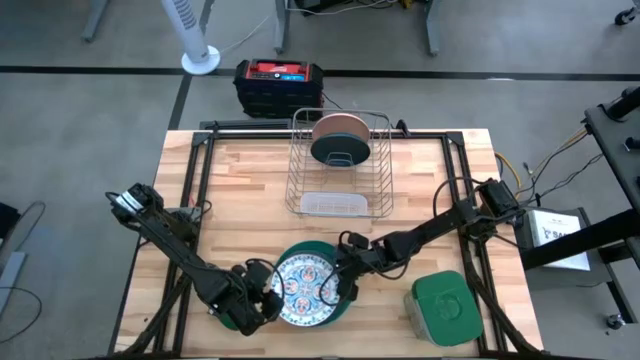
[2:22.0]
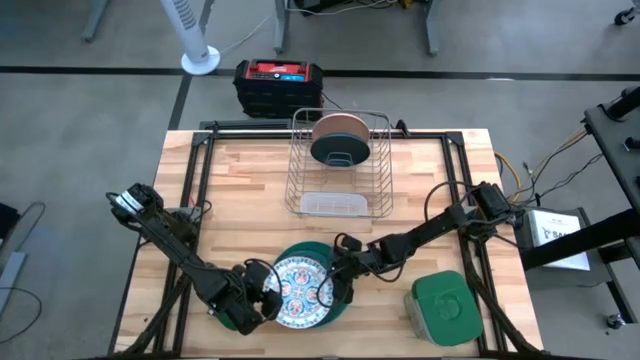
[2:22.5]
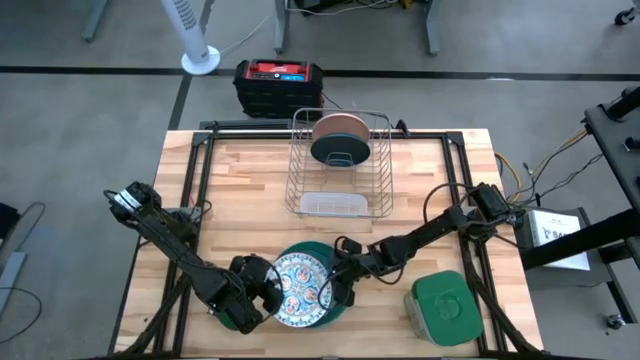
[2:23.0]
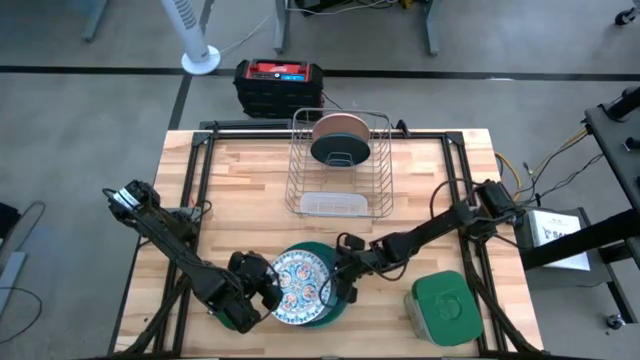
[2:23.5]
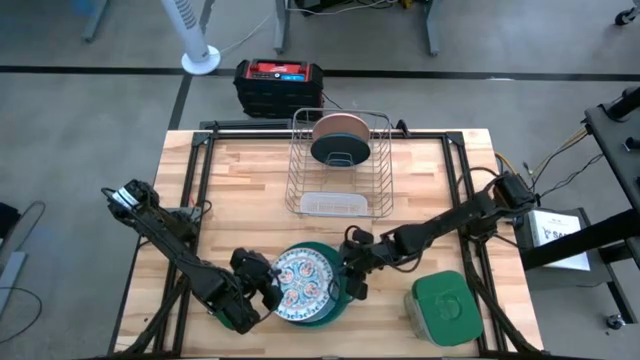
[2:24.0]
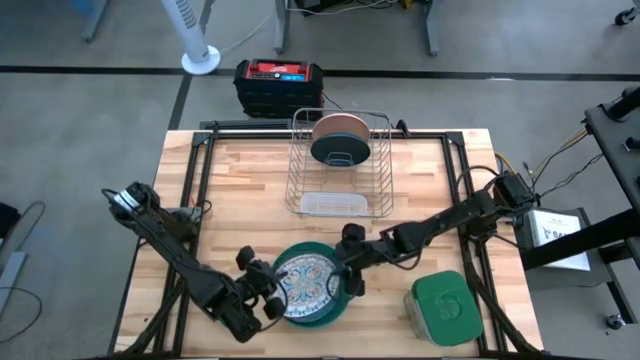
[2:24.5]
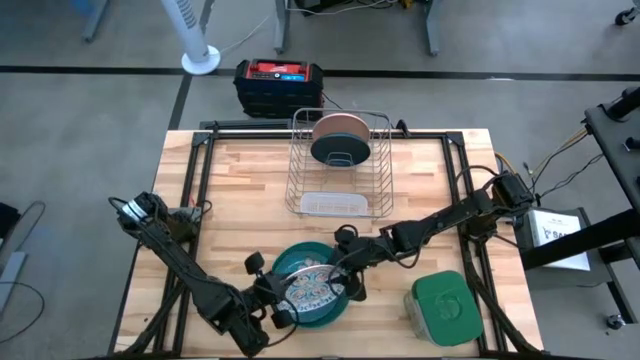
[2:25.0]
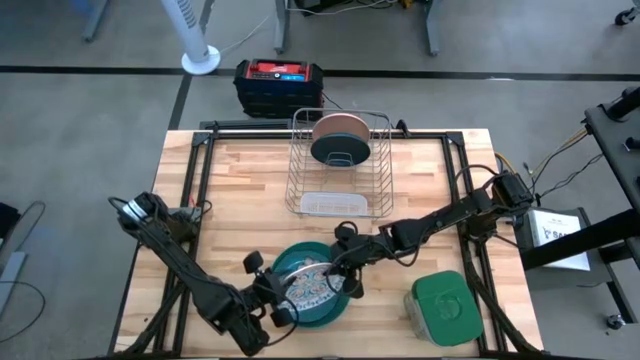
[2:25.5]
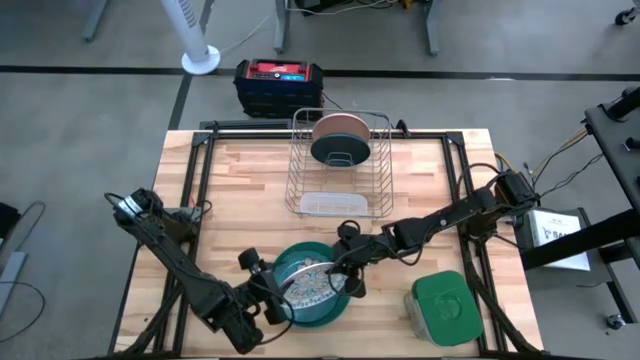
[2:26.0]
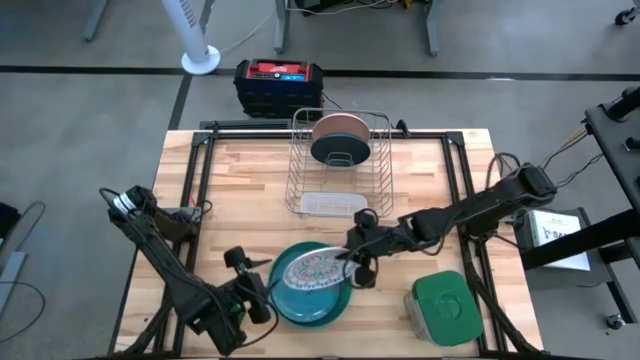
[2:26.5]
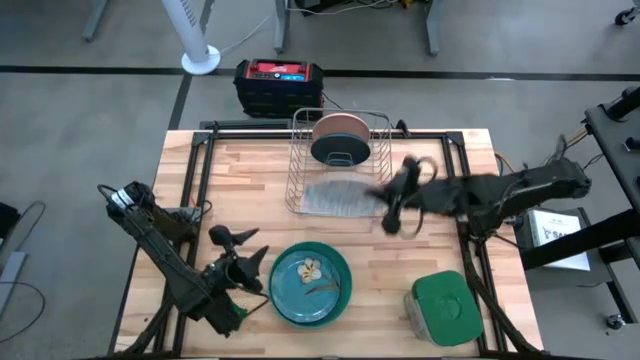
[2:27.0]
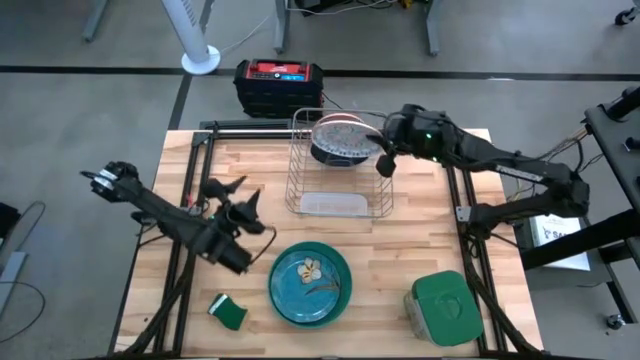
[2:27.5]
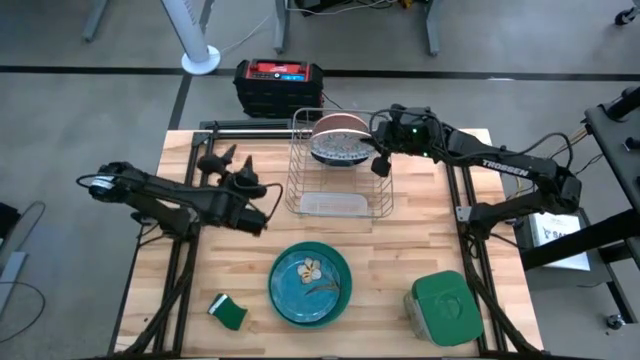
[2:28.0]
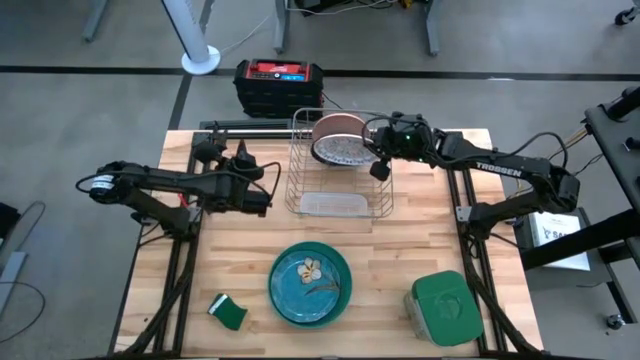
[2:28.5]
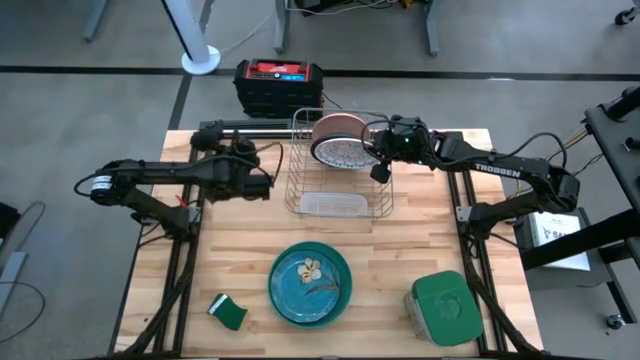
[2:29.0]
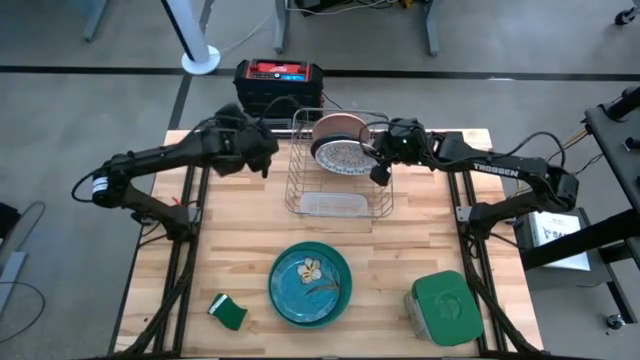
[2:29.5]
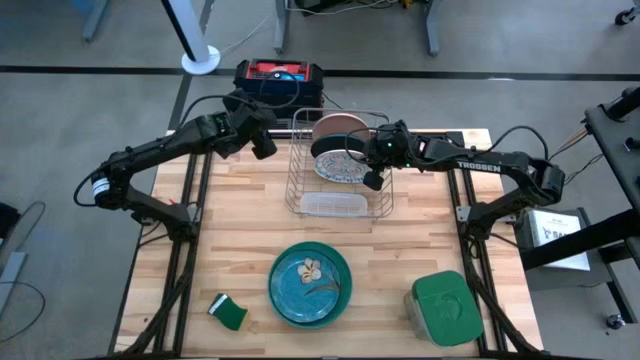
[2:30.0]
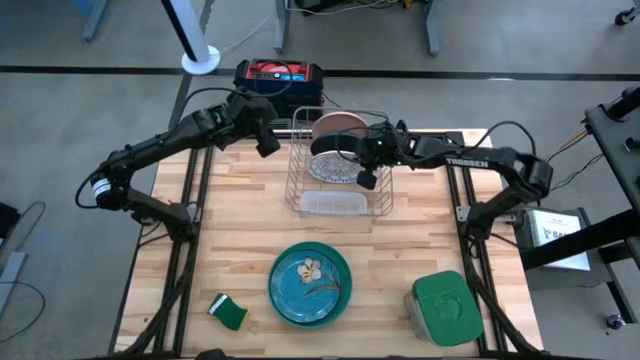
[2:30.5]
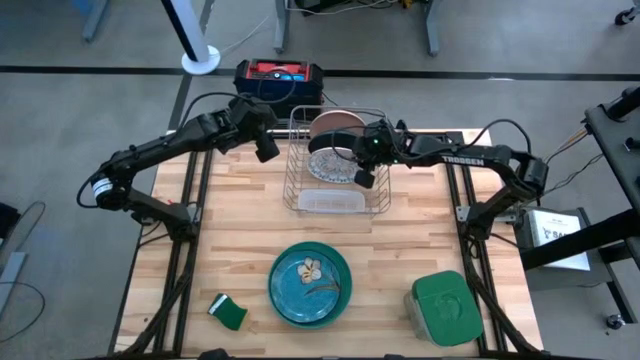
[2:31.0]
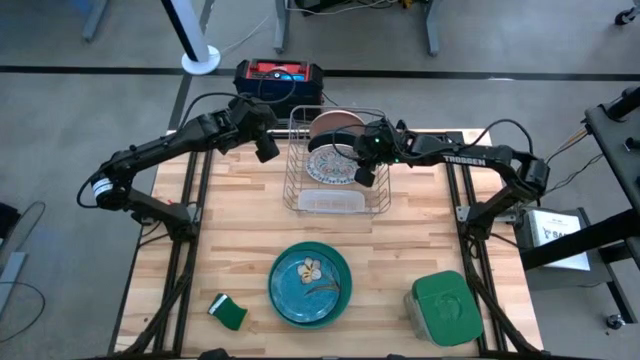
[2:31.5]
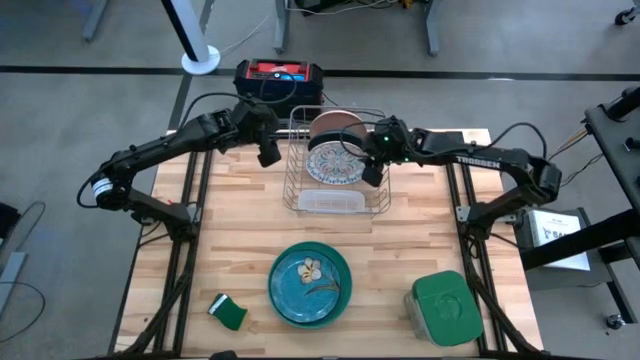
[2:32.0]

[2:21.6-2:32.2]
Task: Sort dishes
Put the white patterned plate in the dishwasher rack

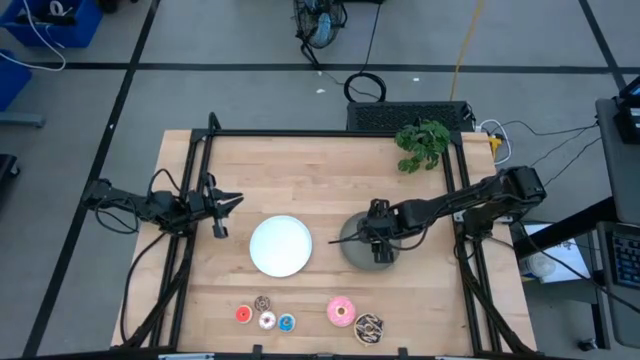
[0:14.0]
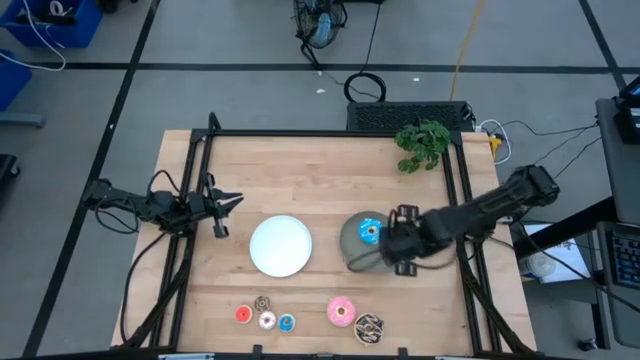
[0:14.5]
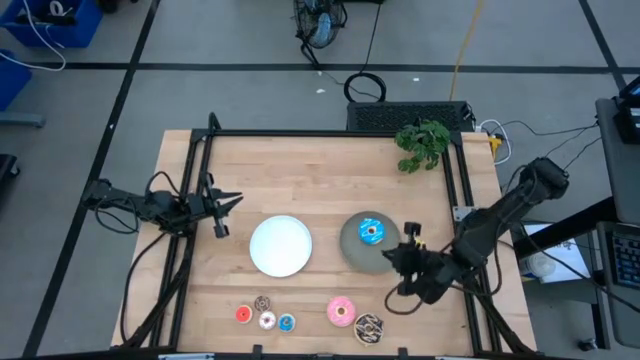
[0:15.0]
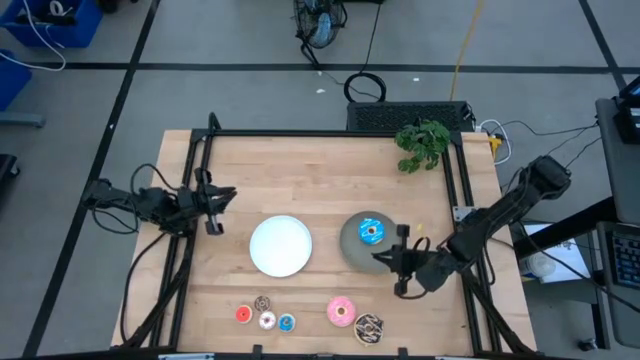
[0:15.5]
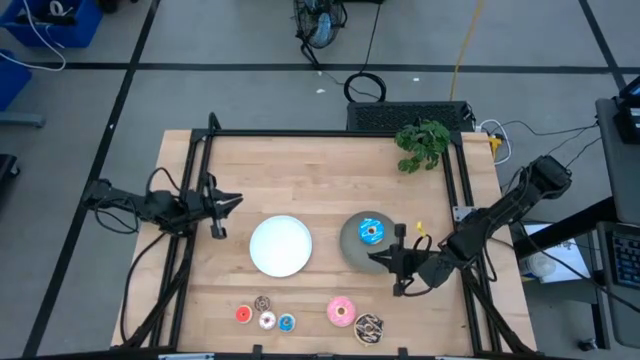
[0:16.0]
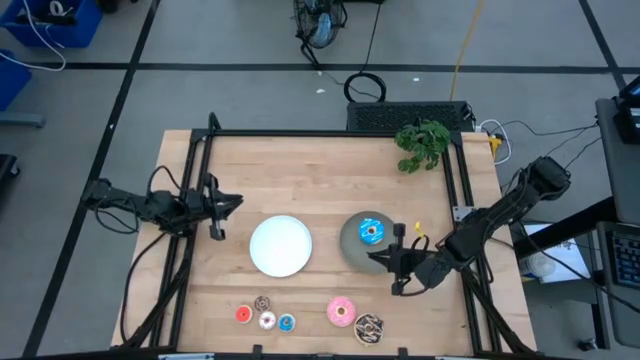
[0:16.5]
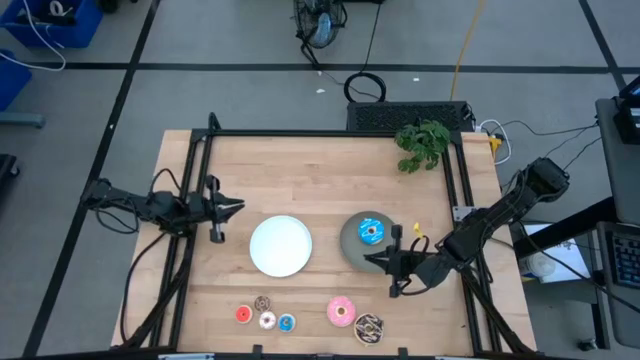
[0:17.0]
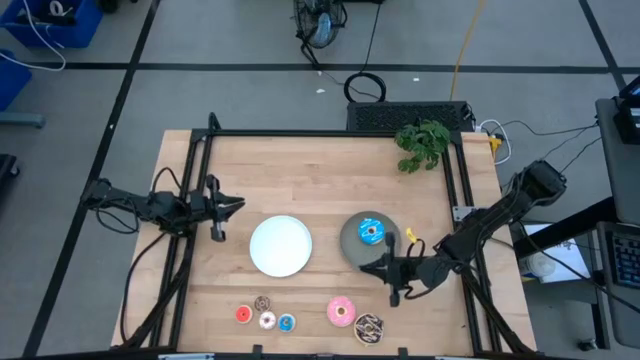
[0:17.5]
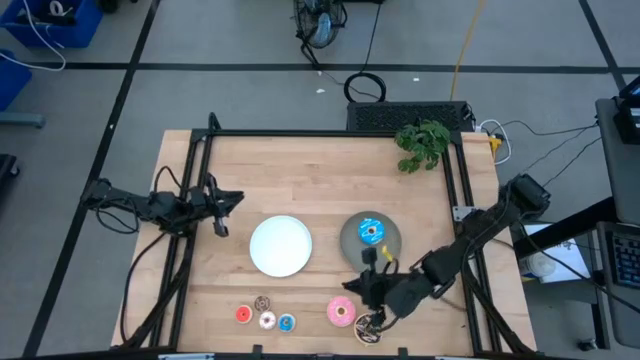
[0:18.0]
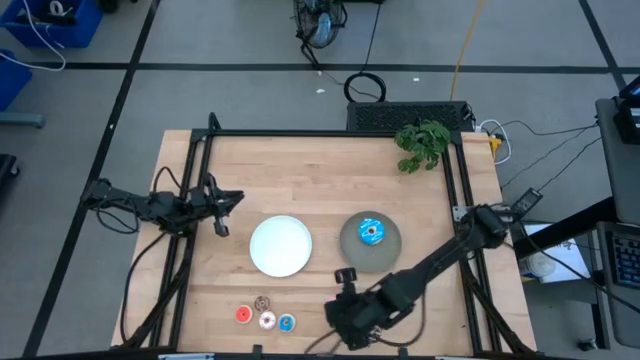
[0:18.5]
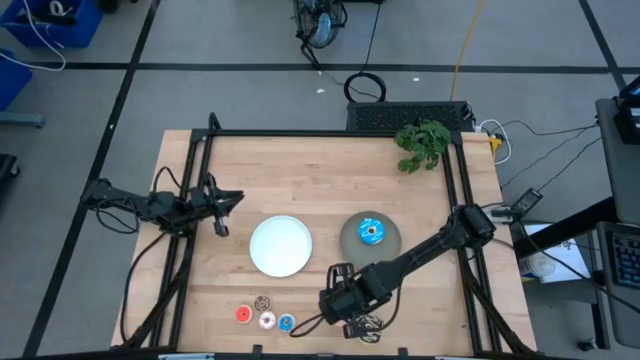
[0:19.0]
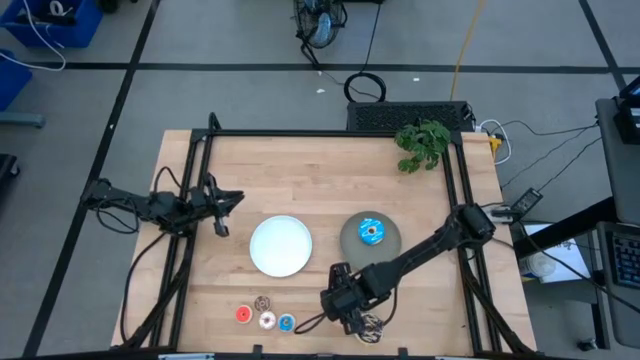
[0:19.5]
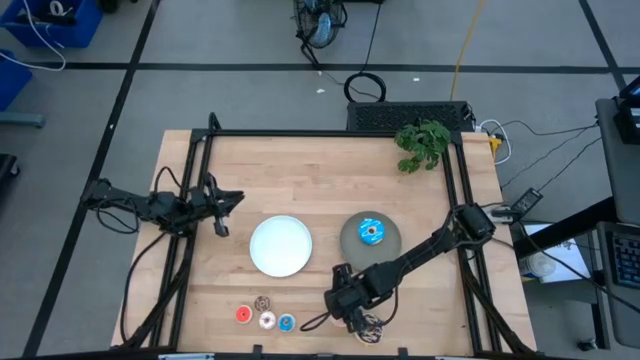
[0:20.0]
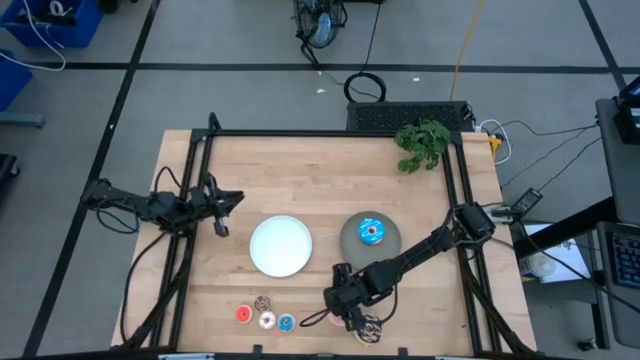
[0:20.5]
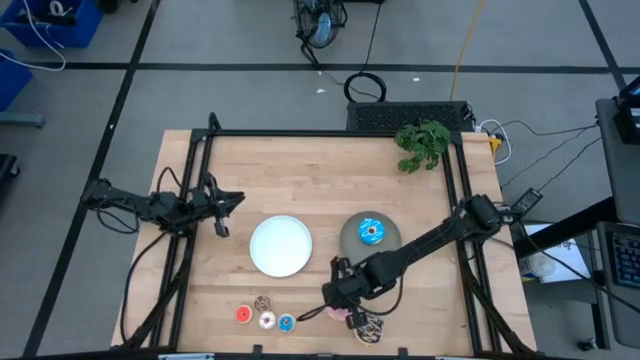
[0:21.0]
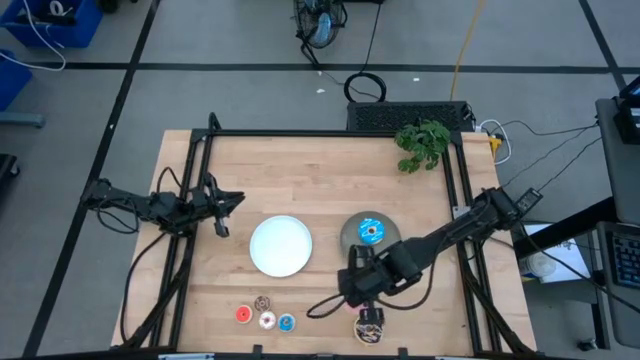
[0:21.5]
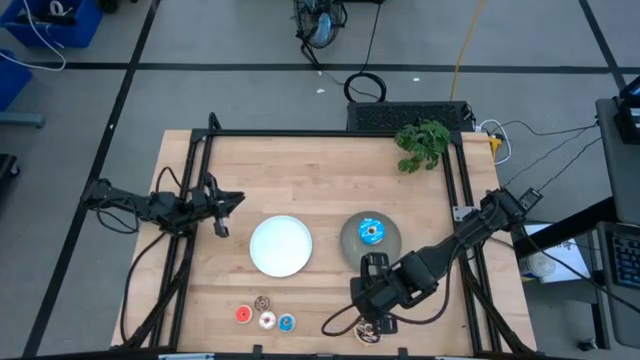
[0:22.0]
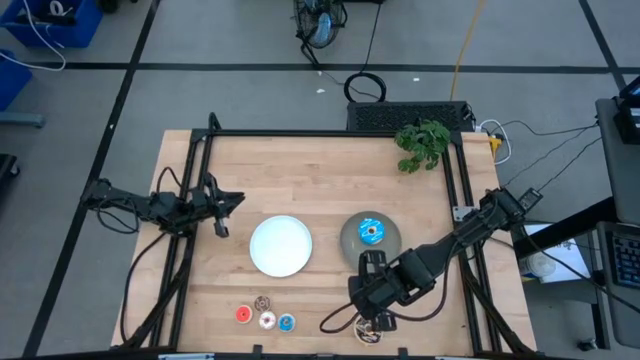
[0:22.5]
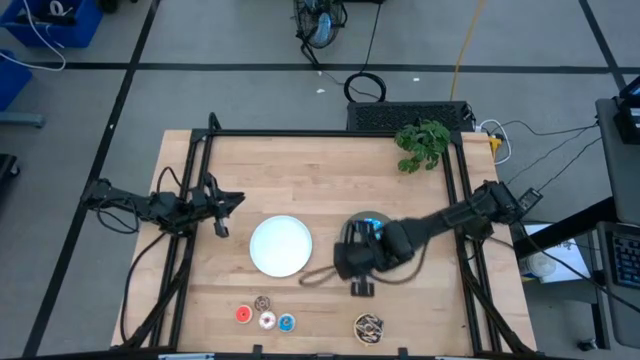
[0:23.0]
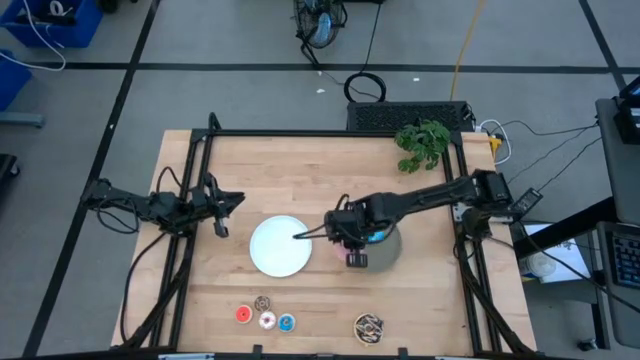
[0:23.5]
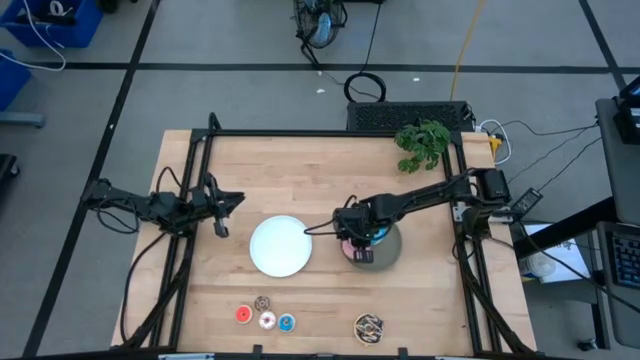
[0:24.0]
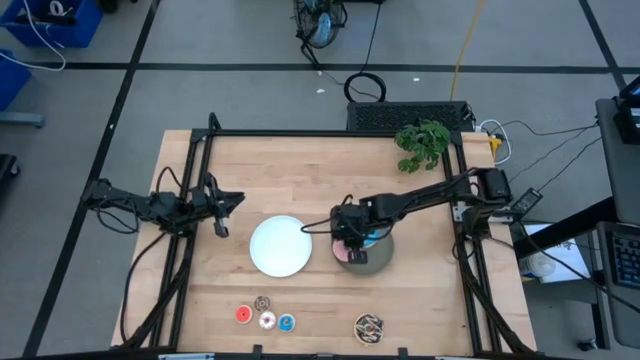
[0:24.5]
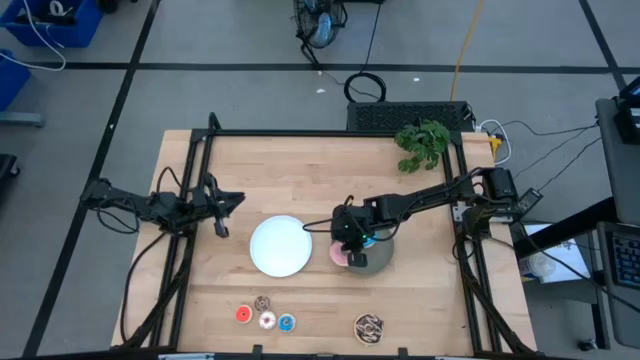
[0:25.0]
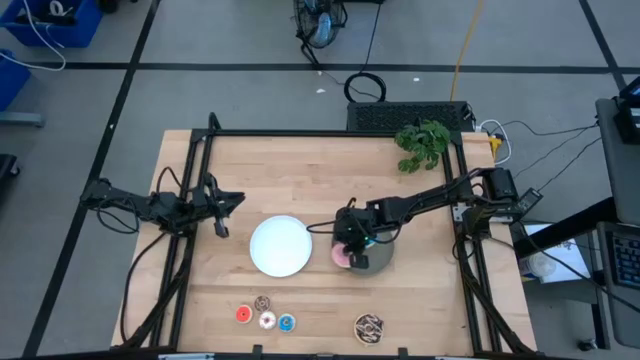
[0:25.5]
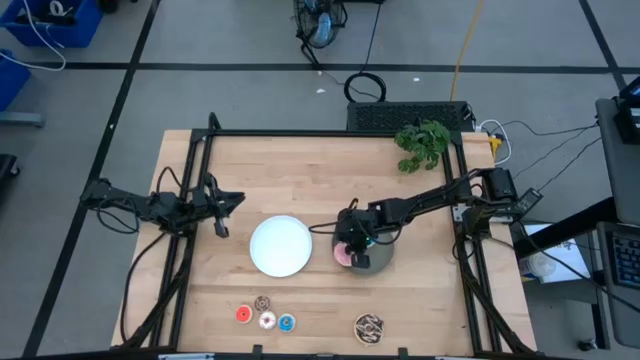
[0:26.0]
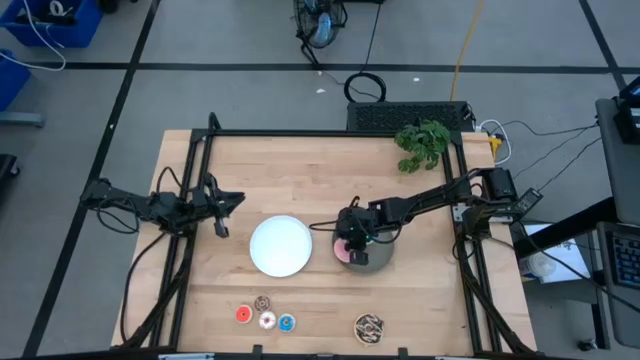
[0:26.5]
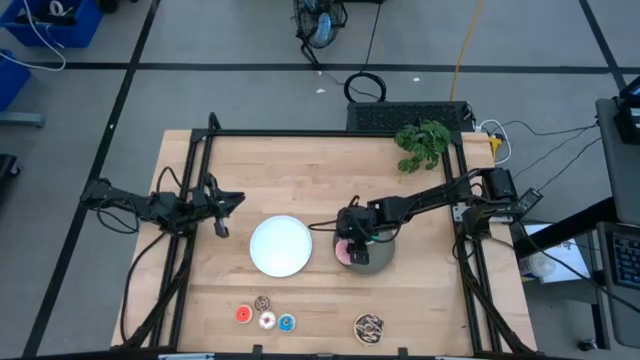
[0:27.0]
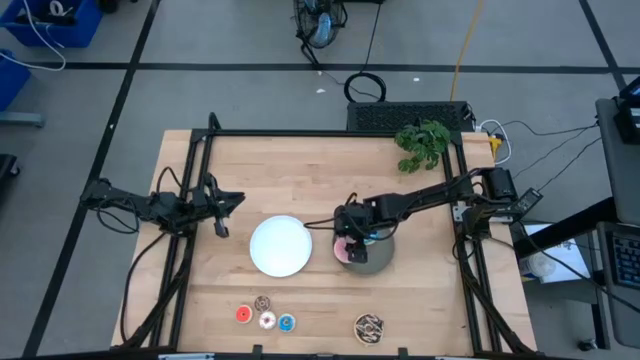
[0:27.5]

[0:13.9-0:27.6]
Task: Pick & Place donuts
Put the large pink donut in the gray bin
